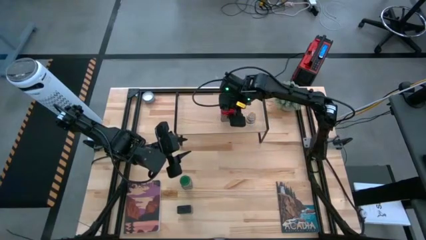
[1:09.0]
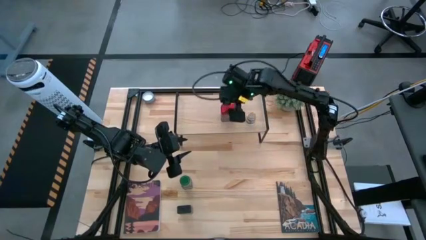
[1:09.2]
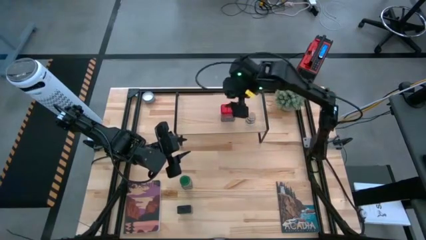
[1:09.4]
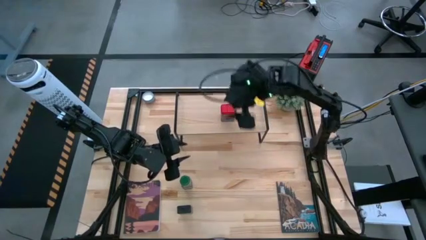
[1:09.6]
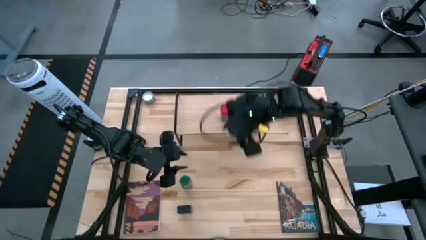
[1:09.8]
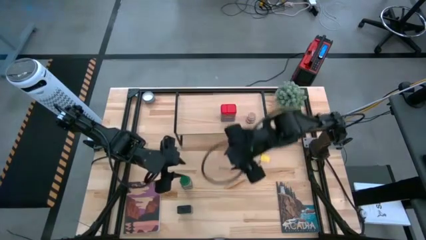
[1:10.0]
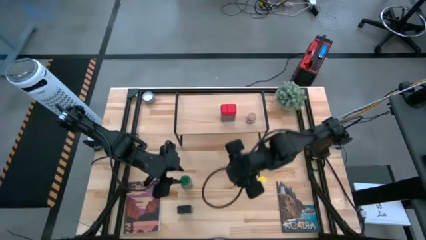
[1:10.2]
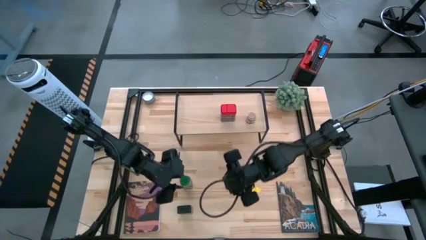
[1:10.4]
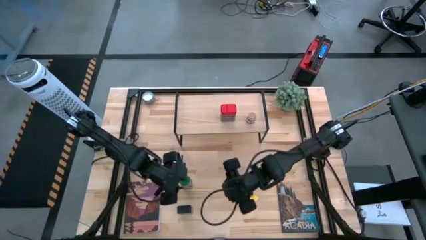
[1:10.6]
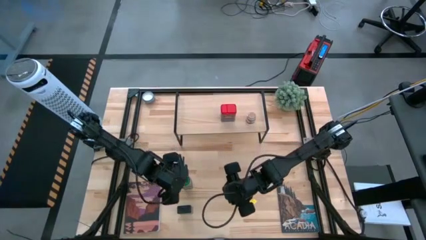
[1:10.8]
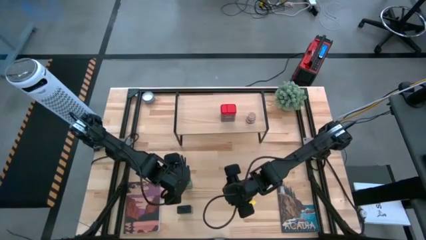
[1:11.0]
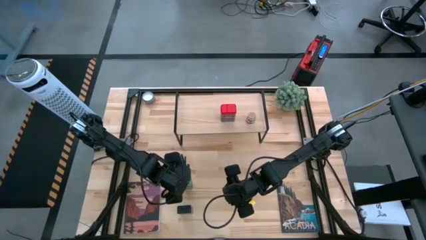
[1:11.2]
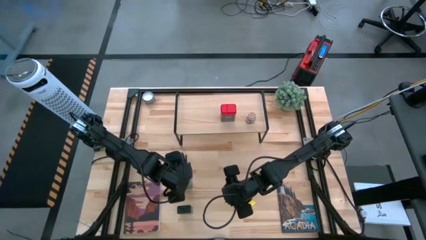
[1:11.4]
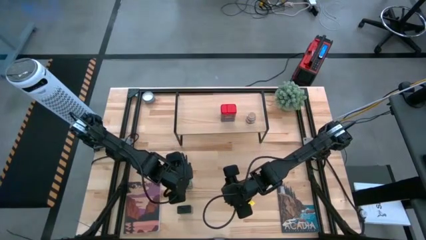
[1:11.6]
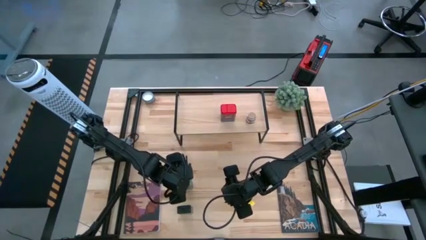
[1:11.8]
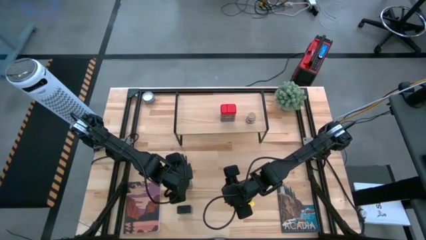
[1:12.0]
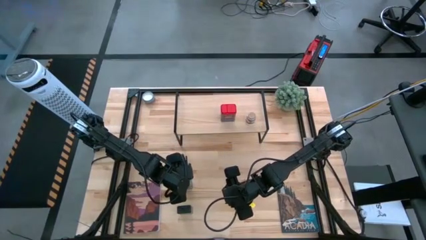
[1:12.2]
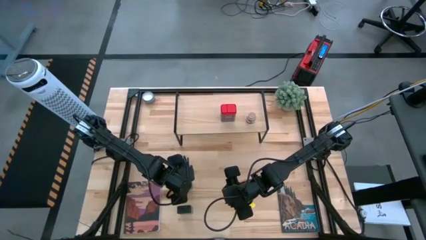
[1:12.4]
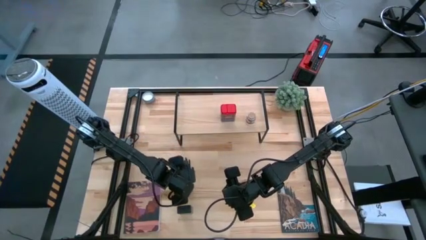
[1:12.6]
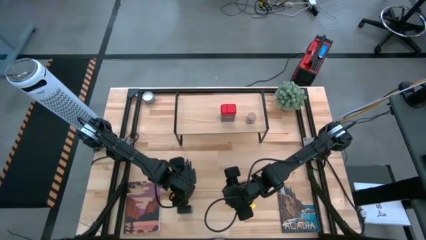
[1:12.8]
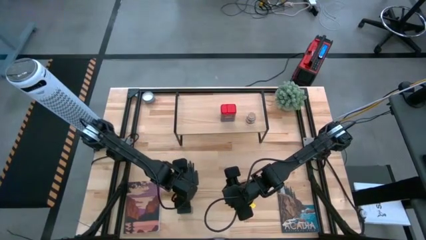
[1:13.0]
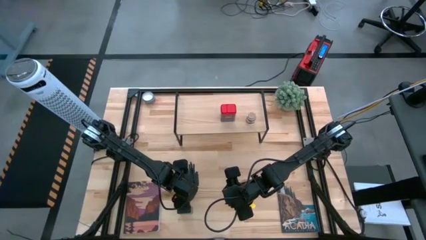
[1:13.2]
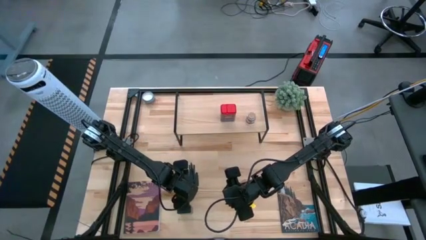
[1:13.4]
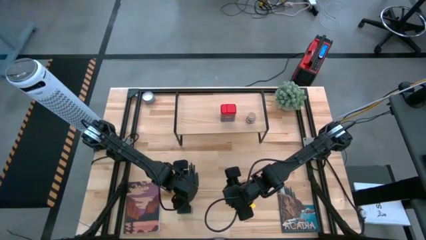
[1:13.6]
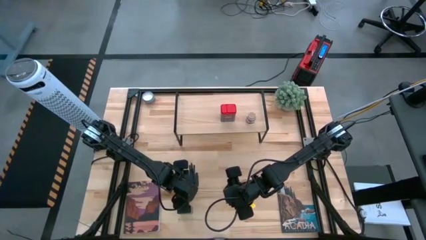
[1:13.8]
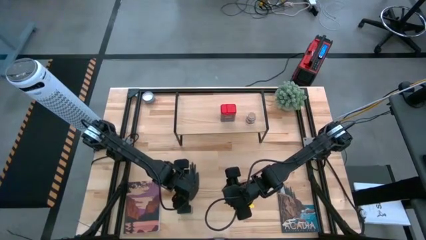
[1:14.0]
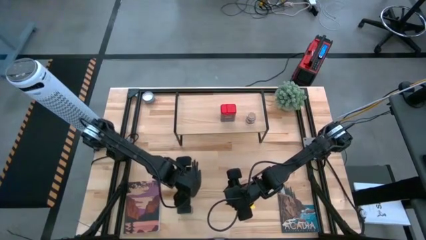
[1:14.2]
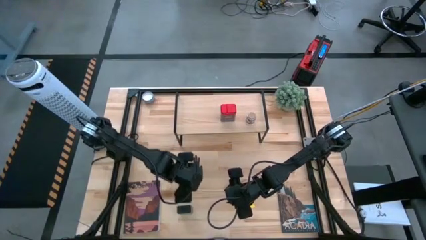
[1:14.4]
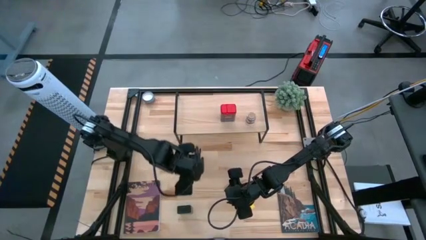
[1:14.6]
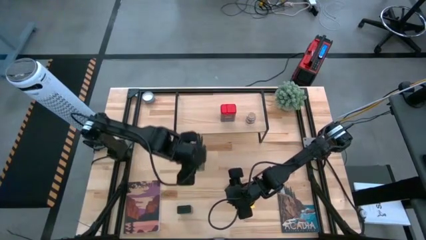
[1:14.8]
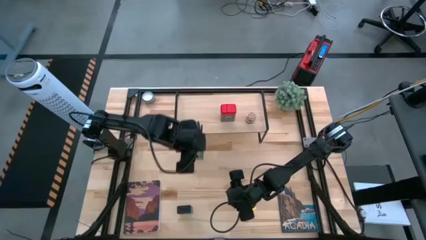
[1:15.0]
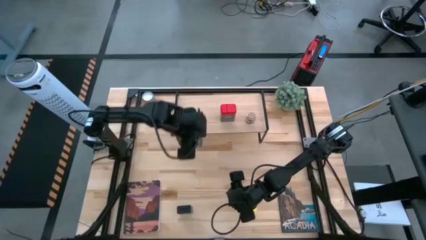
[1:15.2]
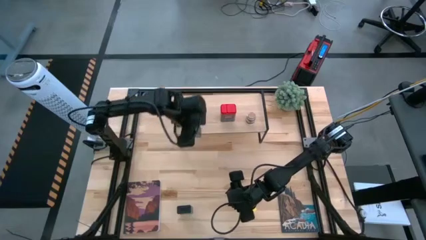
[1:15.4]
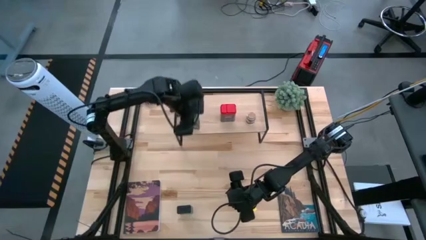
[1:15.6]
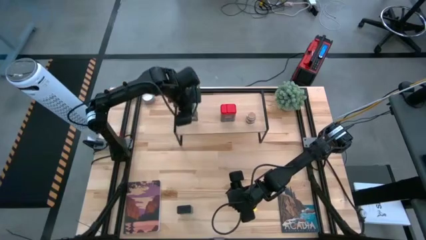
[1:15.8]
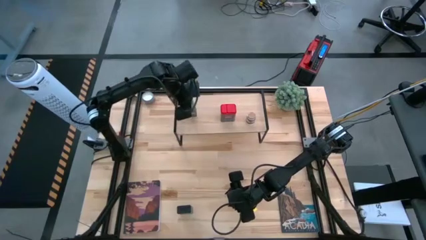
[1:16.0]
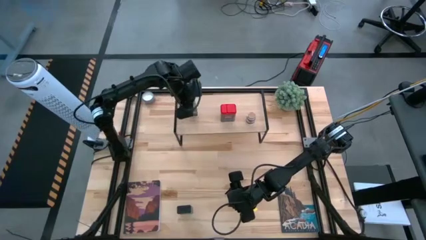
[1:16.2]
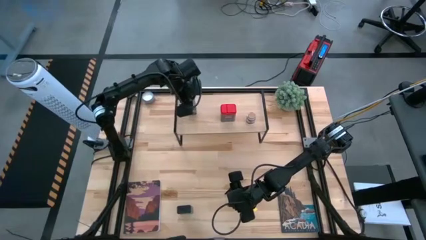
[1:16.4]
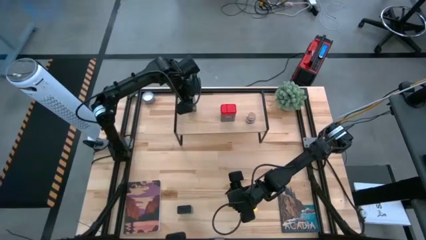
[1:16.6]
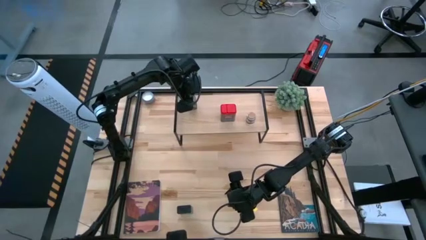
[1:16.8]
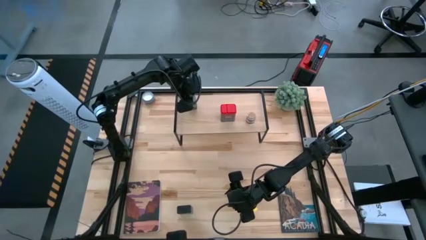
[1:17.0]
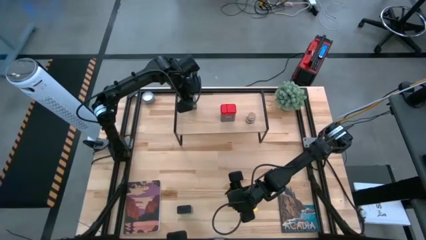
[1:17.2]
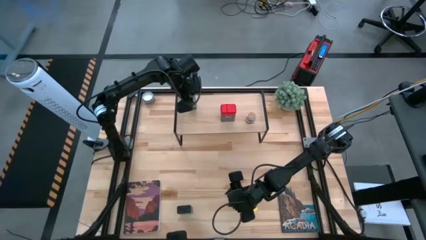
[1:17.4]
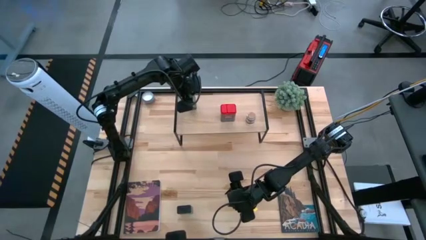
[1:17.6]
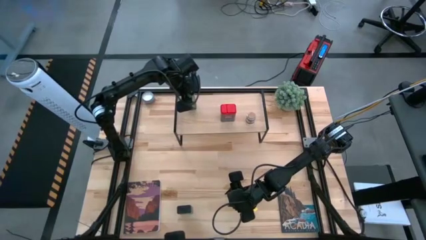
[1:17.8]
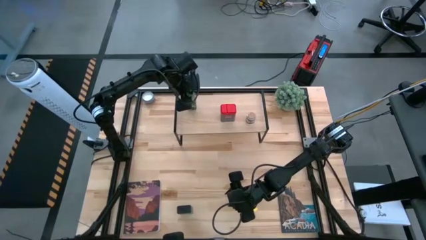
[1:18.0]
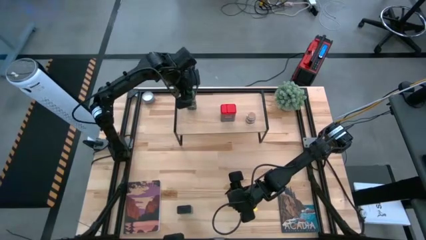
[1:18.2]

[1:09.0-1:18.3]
Task: Shelf spices
Put the green seasoning bottle on the shelf

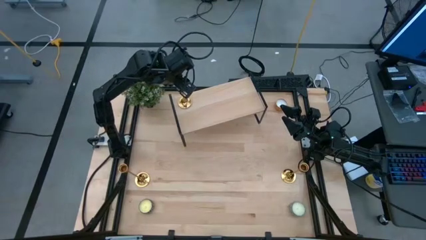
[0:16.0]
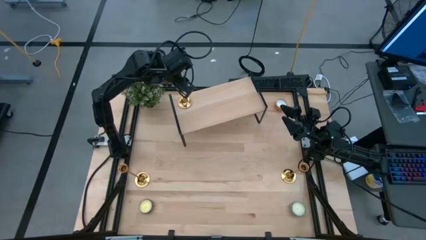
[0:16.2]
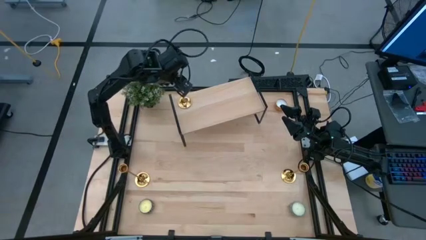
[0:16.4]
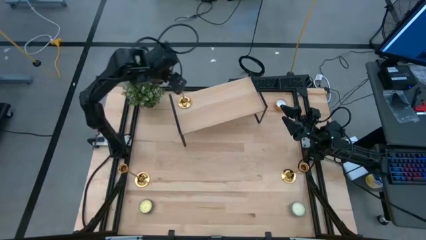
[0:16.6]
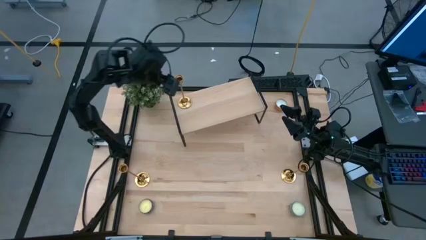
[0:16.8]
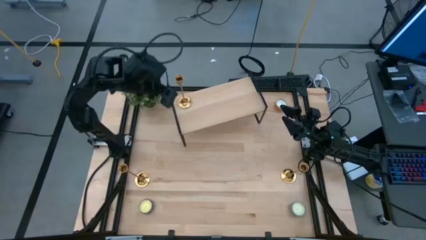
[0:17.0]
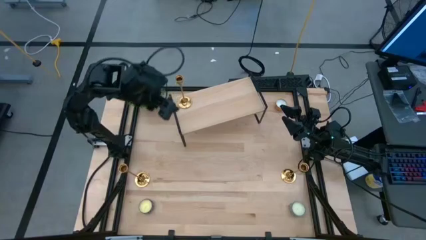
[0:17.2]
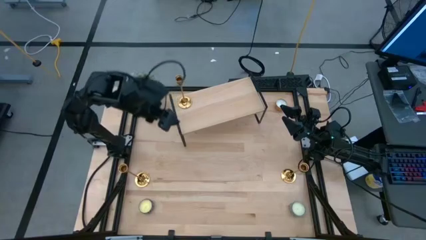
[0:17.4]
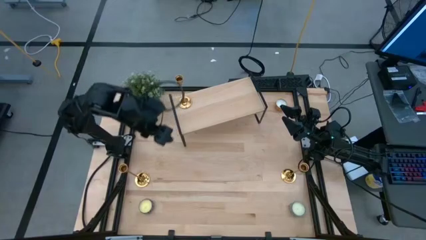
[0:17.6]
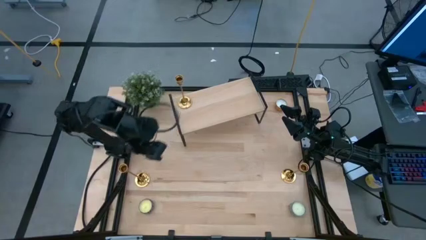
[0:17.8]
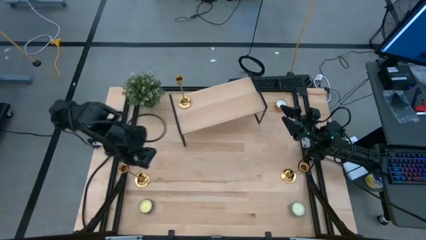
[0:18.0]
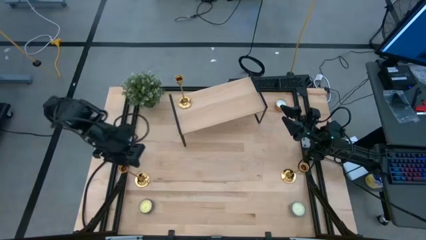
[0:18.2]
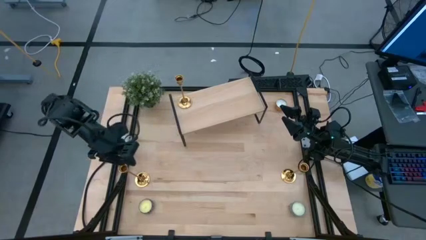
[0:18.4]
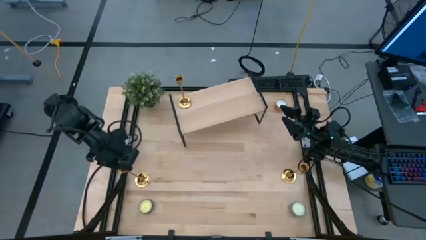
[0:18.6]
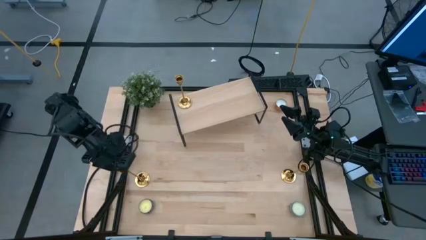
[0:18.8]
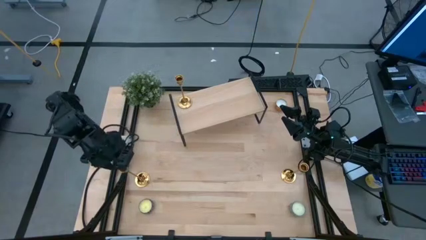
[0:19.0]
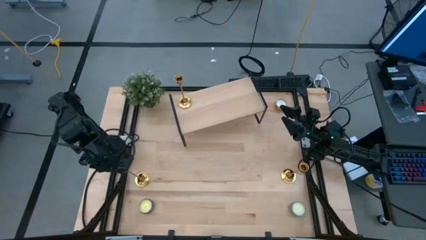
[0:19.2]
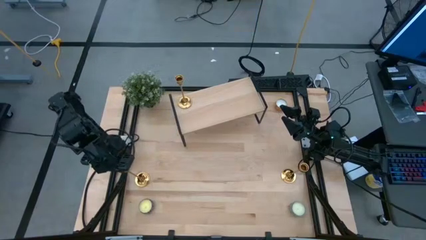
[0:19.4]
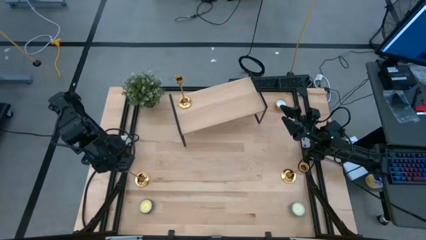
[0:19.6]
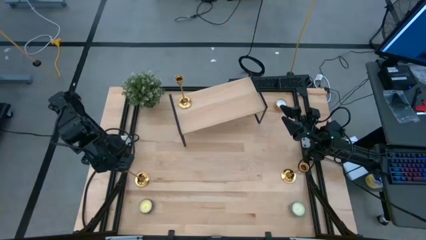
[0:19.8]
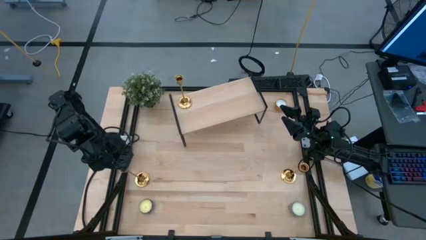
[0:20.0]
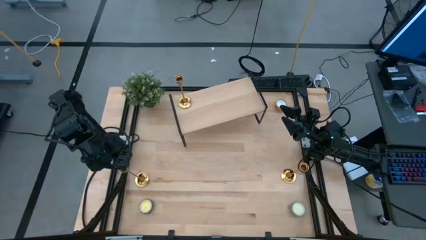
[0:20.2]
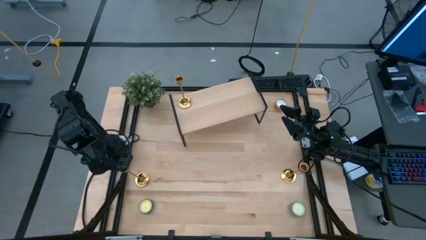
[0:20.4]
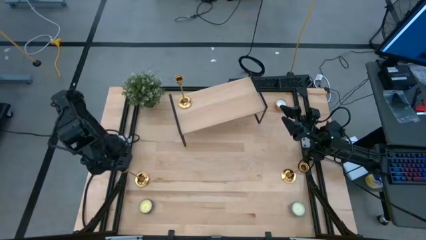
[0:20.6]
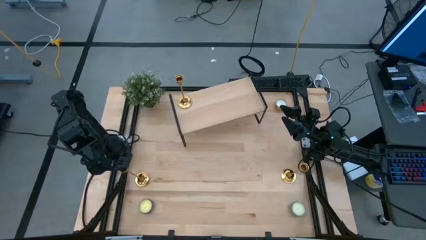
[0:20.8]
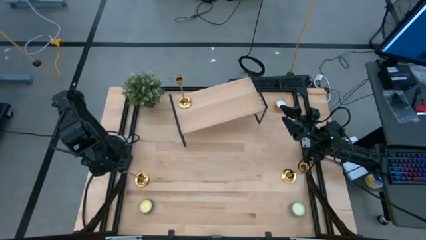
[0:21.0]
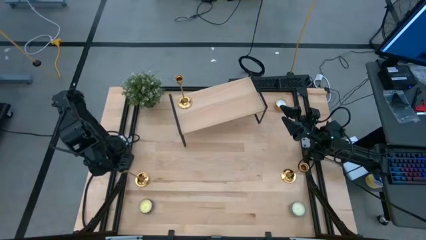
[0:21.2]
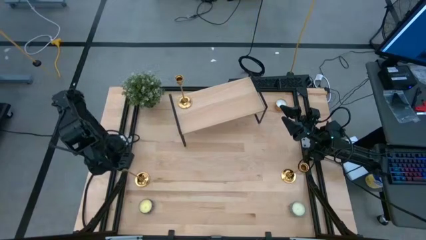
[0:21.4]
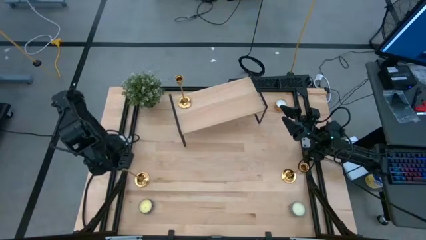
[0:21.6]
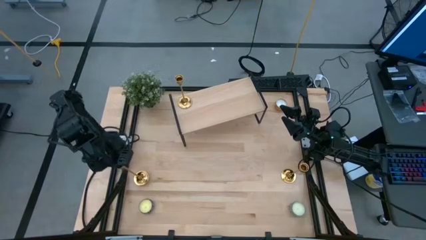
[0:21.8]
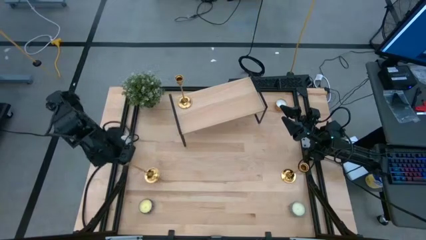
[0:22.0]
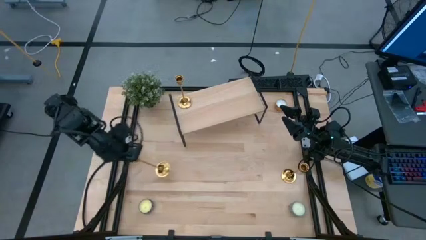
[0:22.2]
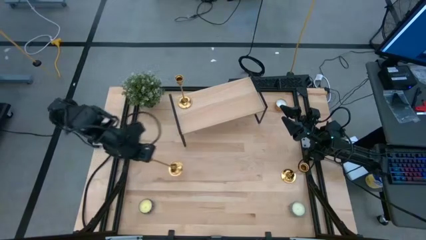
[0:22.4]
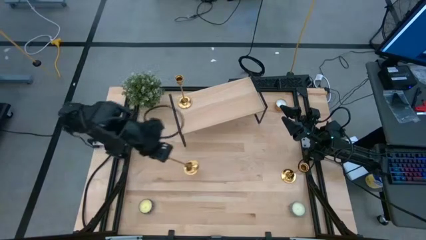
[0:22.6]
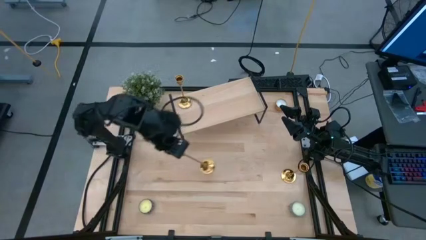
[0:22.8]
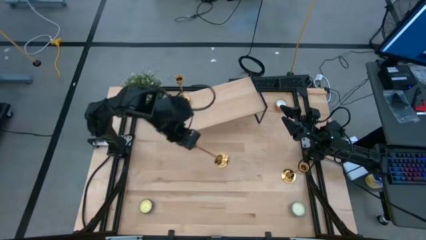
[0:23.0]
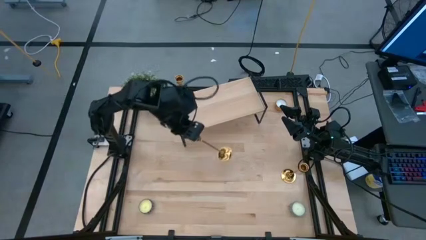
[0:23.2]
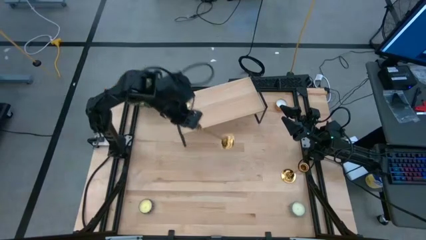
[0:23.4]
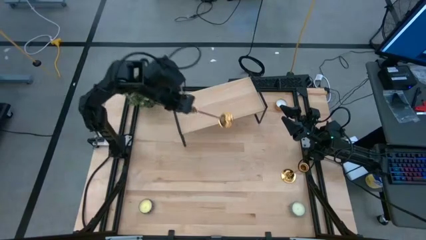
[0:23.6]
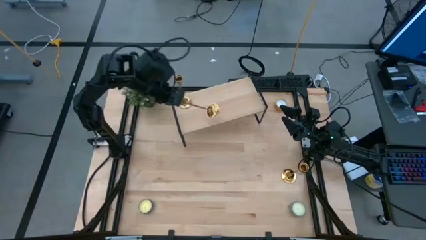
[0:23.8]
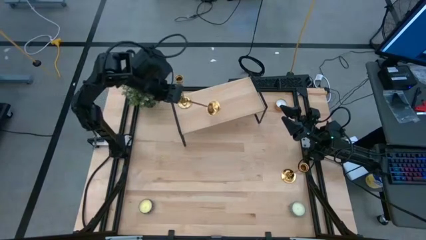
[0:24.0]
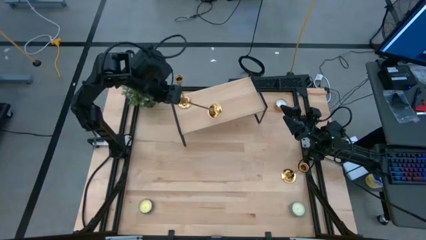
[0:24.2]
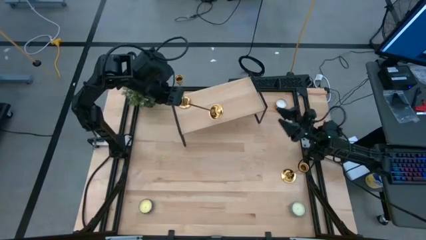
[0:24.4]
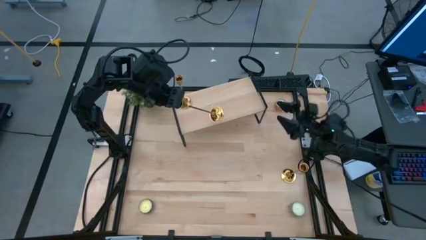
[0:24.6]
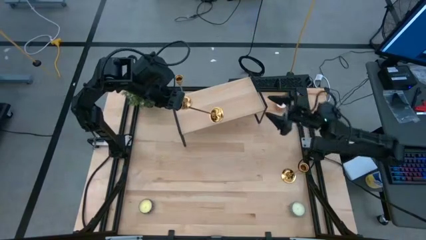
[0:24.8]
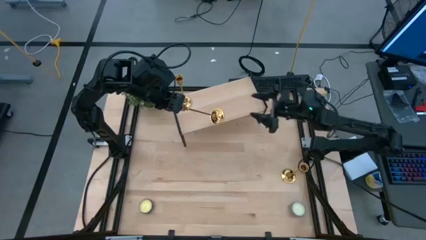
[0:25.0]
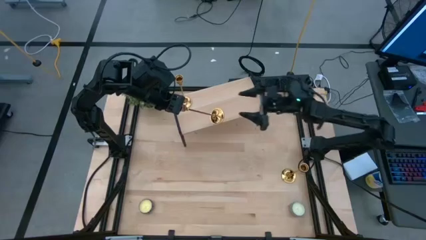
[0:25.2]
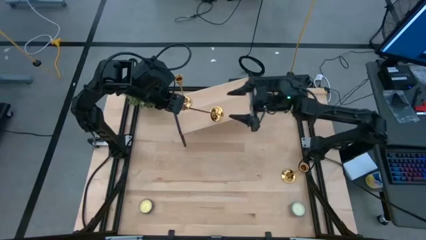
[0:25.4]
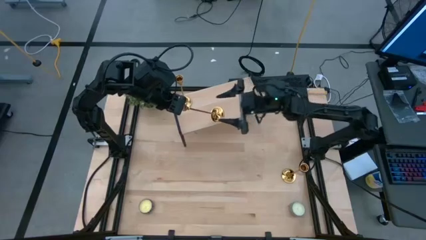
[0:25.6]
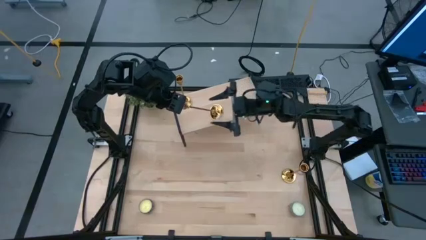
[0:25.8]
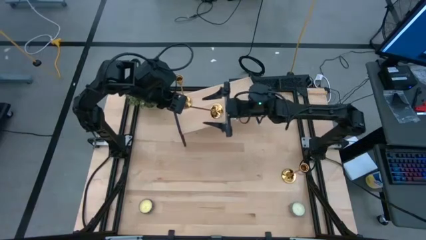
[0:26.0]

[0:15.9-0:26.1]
Task: Pick & Place candle stick holders
Put the left gold candle holder on the shelf aligned with gold candle holder
